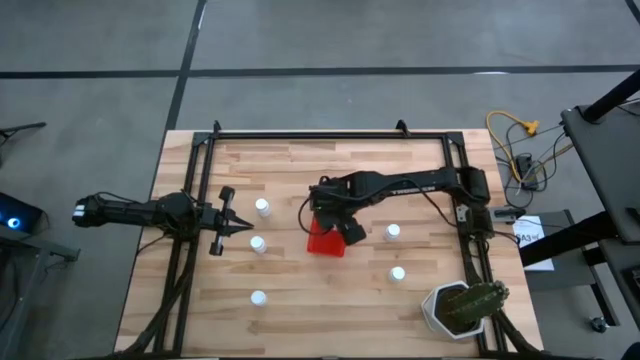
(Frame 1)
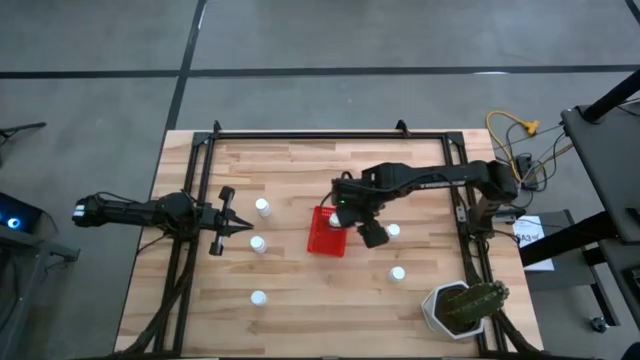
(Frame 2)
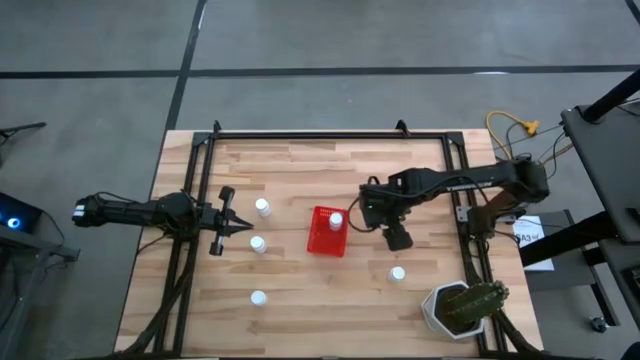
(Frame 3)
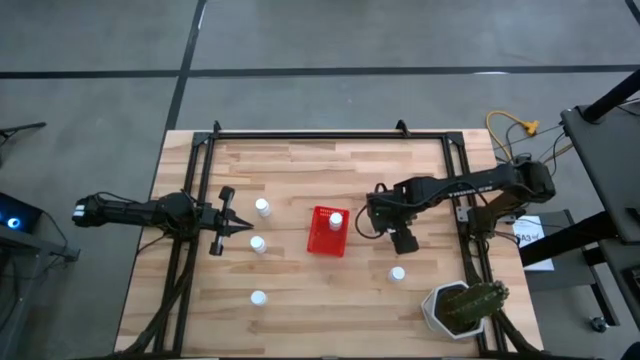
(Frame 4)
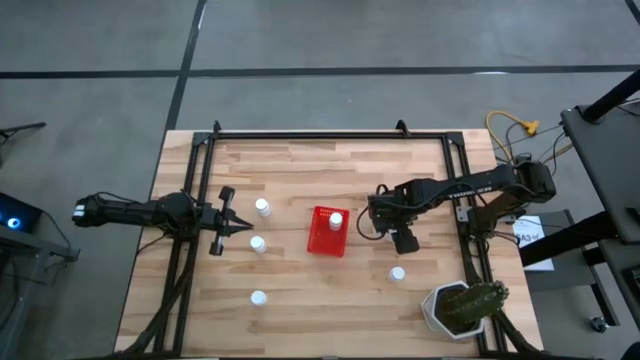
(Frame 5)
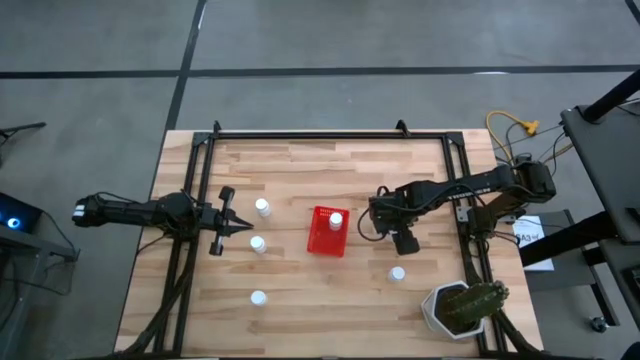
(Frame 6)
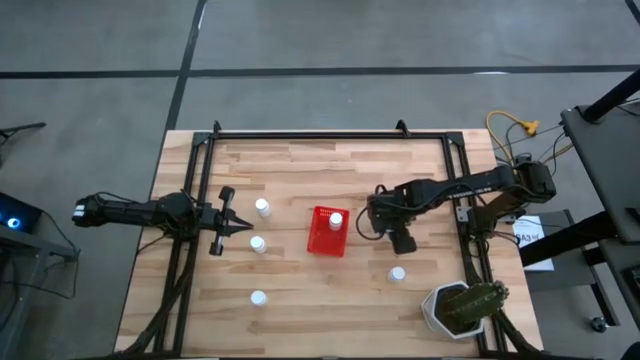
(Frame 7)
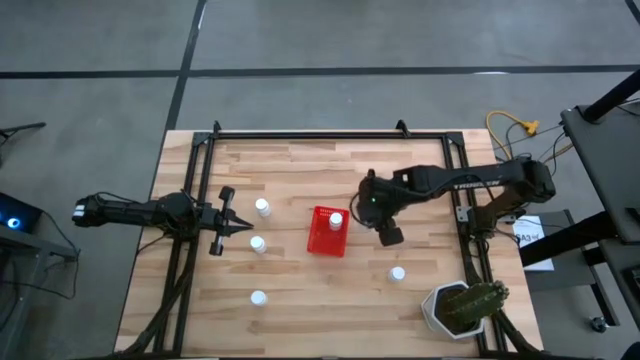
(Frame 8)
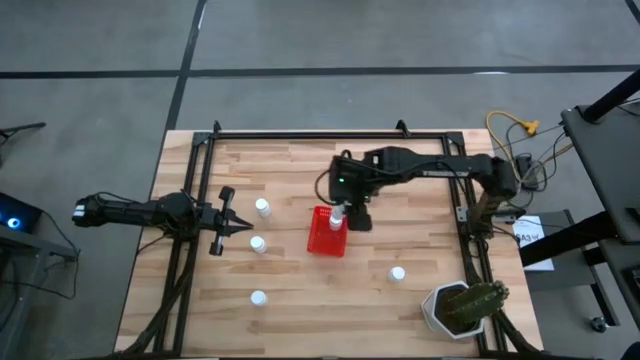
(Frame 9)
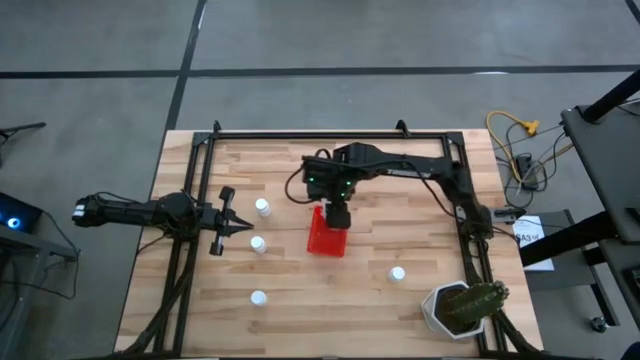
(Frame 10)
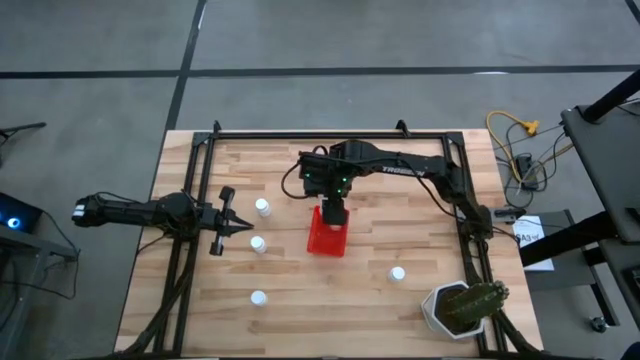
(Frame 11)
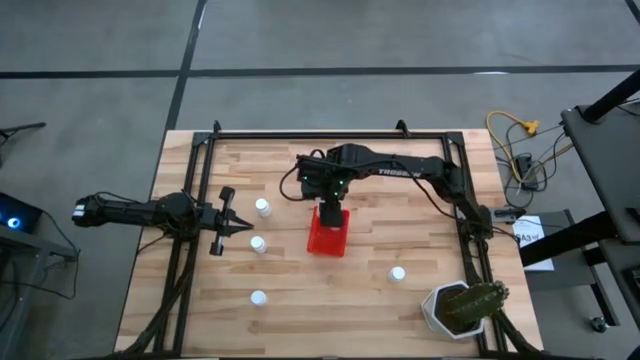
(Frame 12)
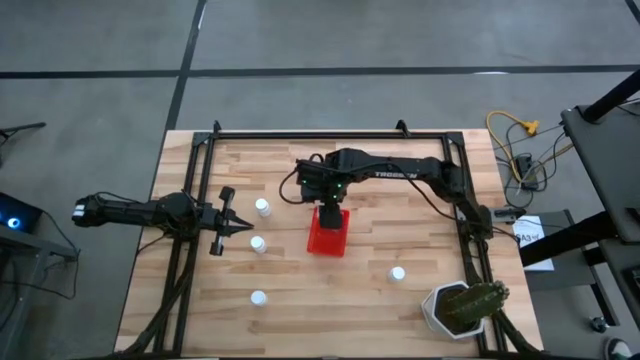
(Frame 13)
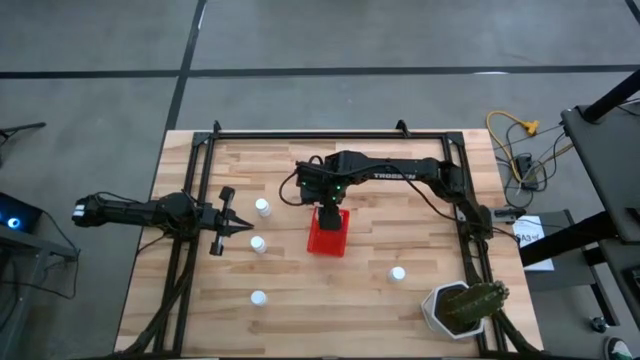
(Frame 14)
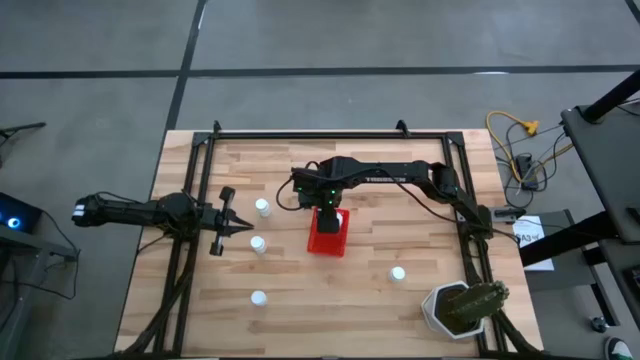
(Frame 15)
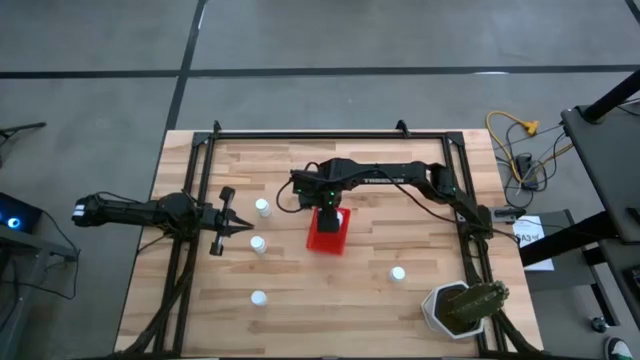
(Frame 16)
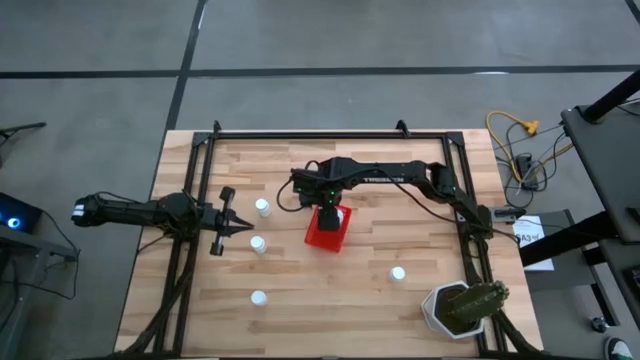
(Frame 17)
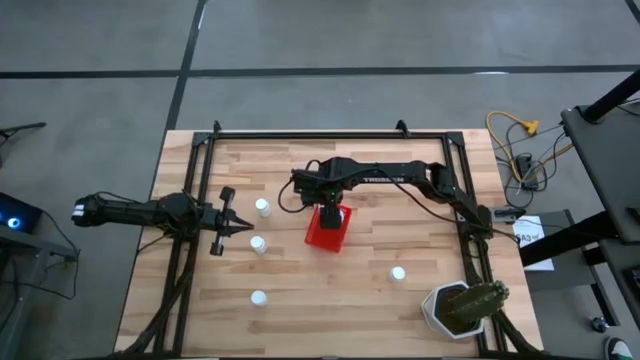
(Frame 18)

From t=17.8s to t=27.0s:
Task: Pick and place pill bottles into a basket
Put the white medicine bottle into the red bin

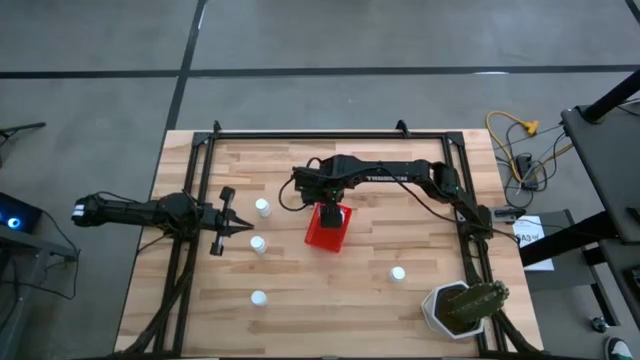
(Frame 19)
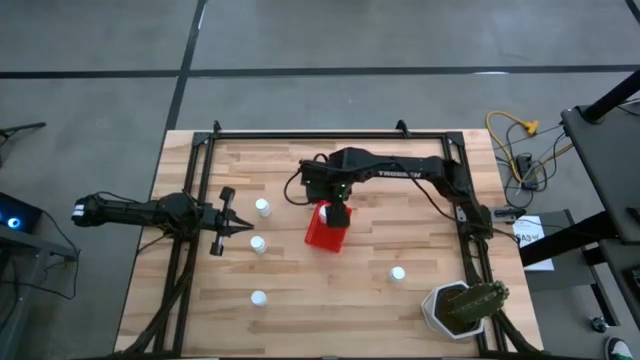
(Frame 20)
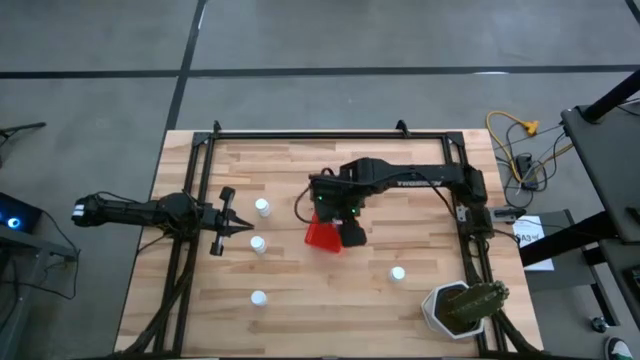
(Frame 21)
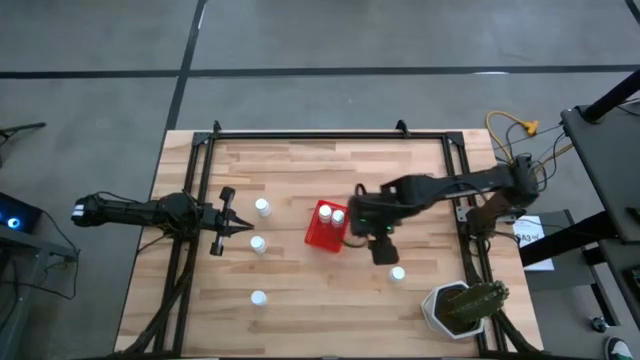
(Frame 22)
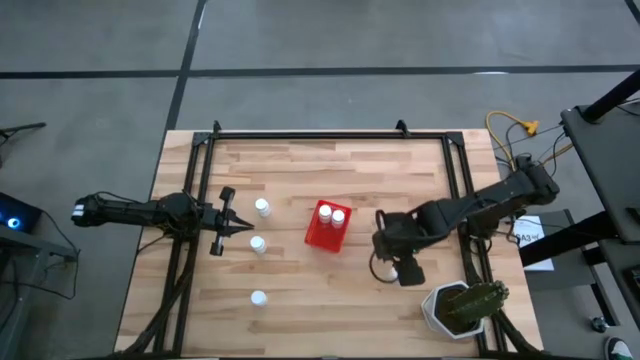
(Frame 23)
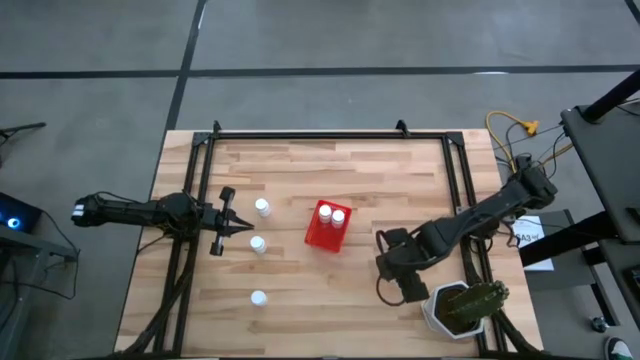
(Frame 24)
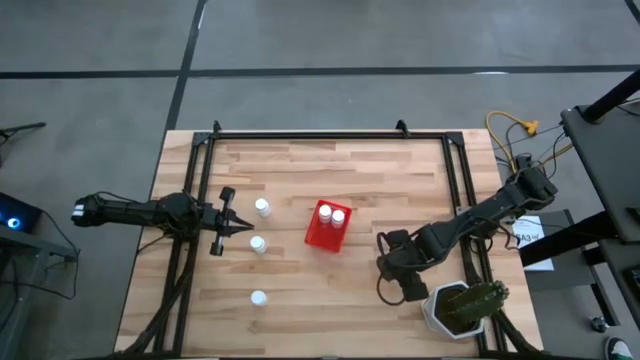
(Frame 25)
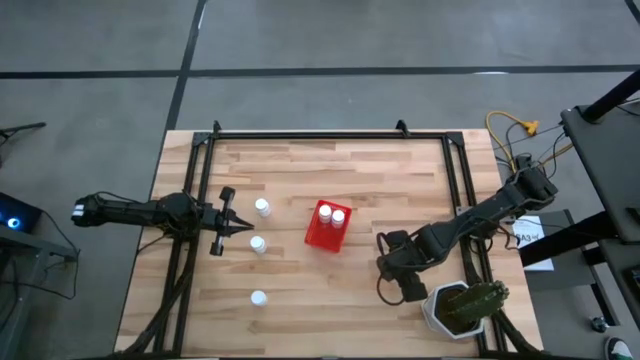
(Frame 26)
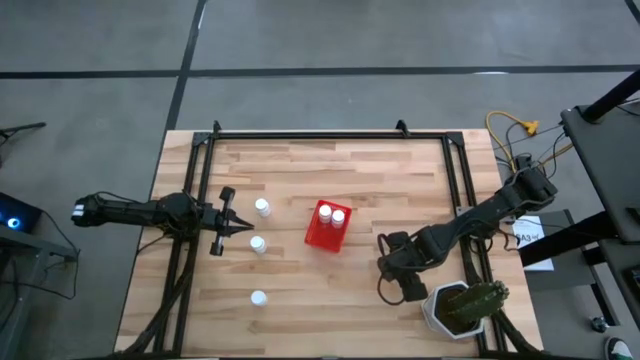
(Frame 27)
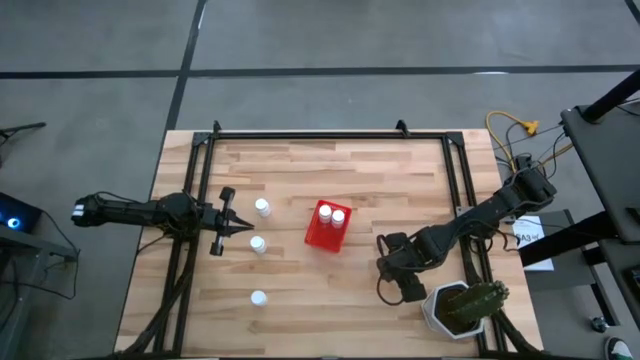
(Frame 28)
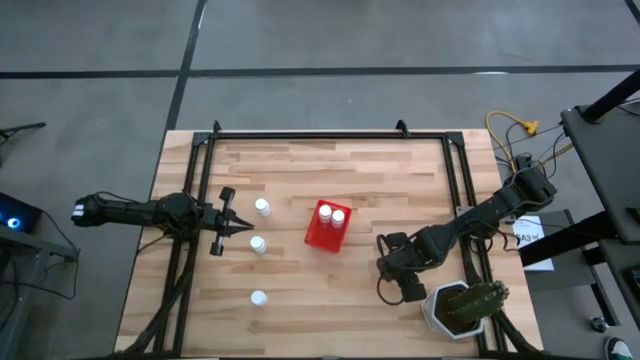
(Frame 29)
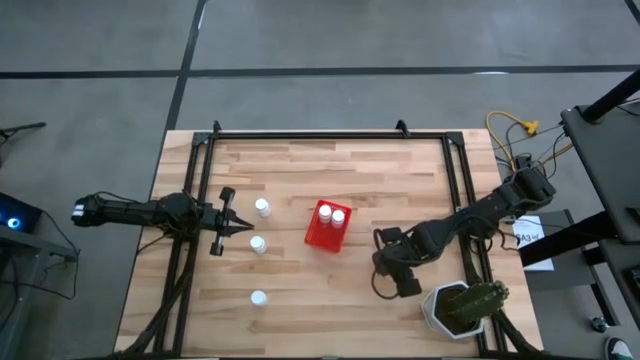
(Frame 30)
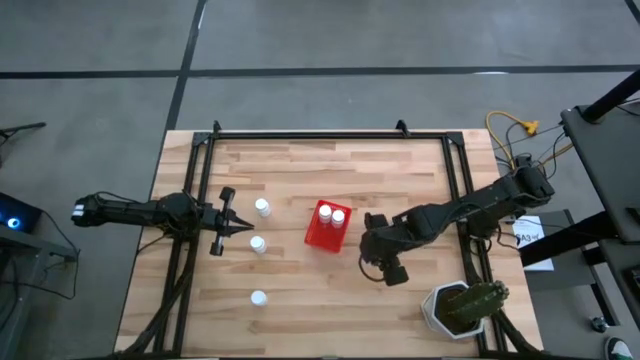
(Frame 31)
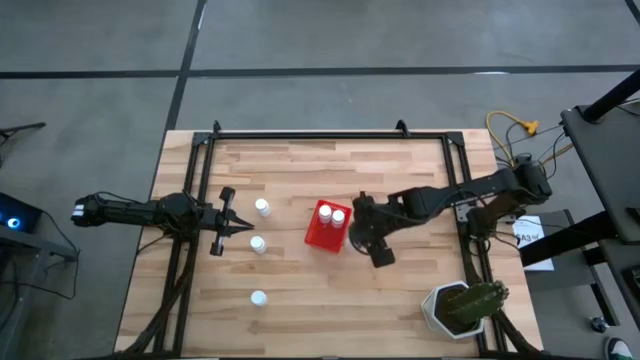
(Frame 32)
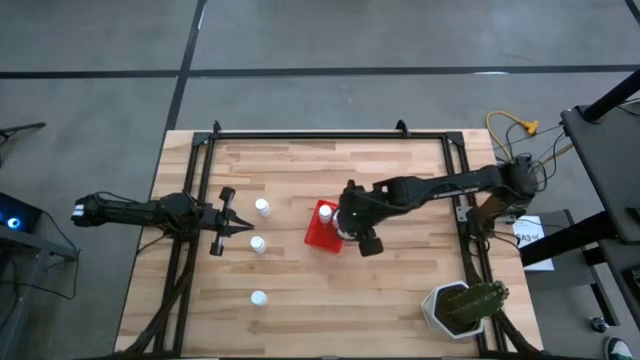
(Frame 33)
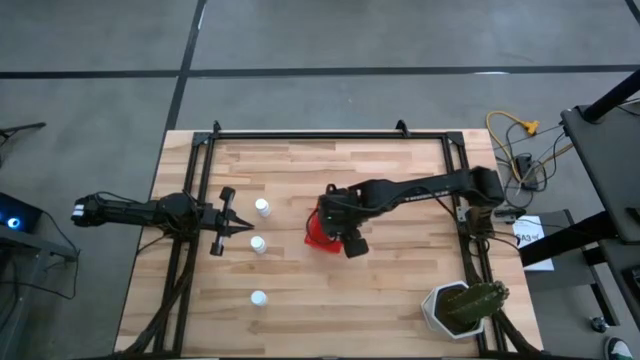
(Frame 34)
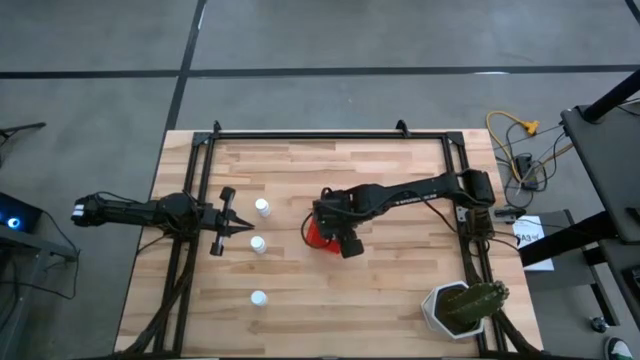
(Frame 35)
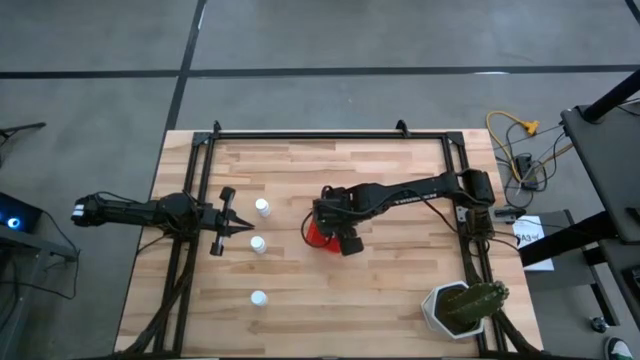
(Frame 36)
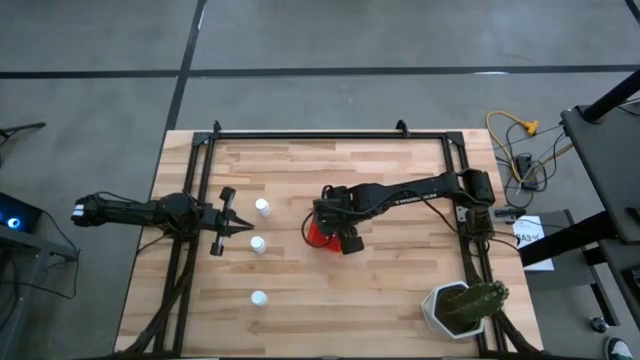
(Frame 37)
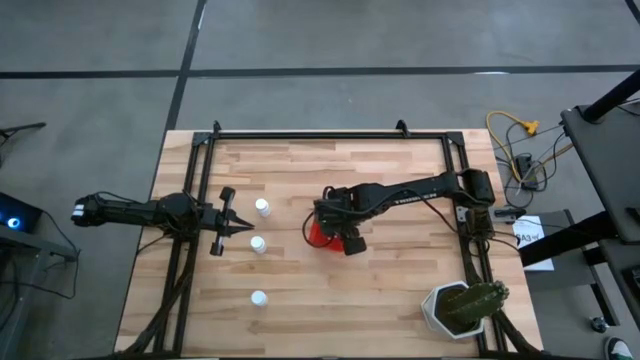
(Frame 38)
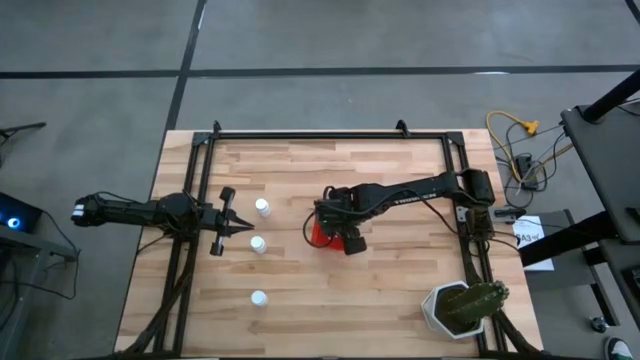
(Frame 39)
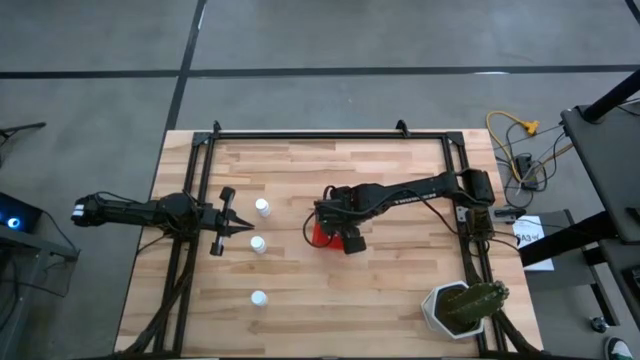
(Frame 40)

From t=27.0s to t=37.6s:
Put the white medicine bottle into the red bin
